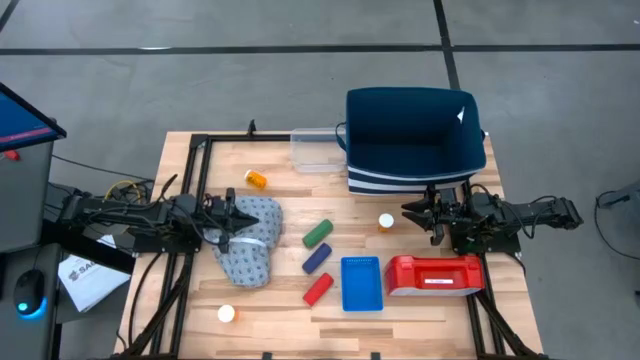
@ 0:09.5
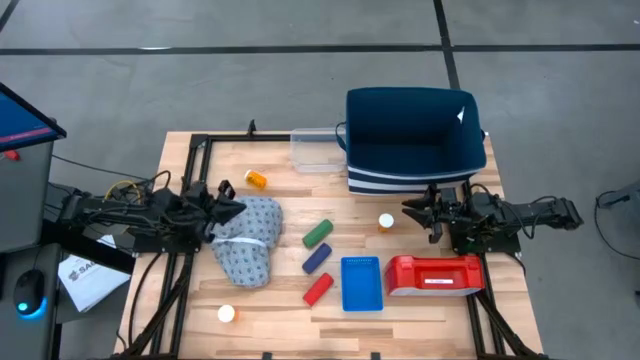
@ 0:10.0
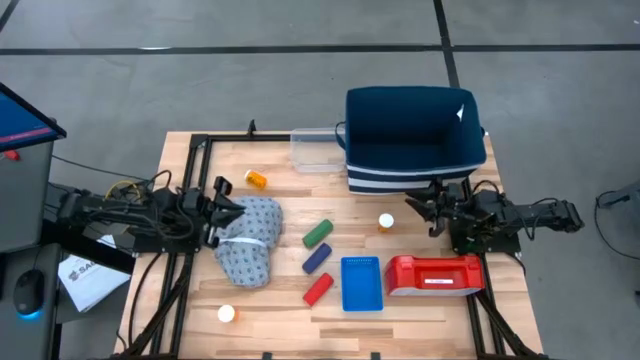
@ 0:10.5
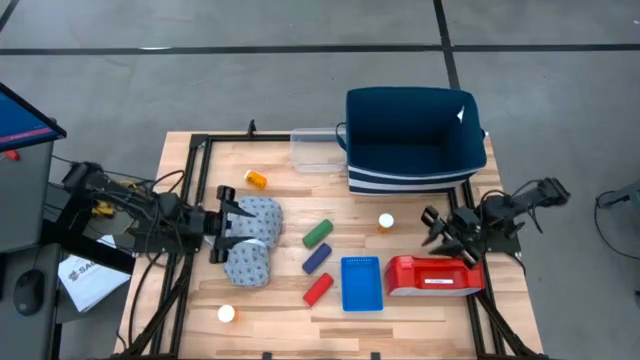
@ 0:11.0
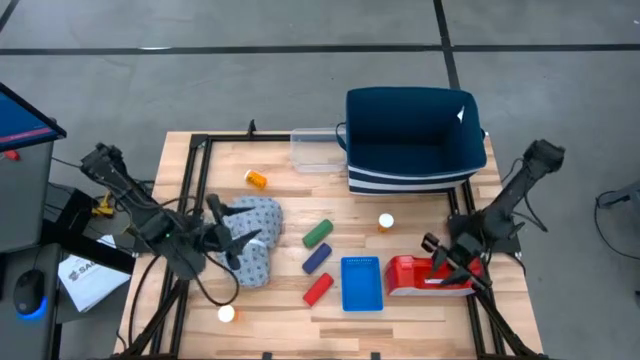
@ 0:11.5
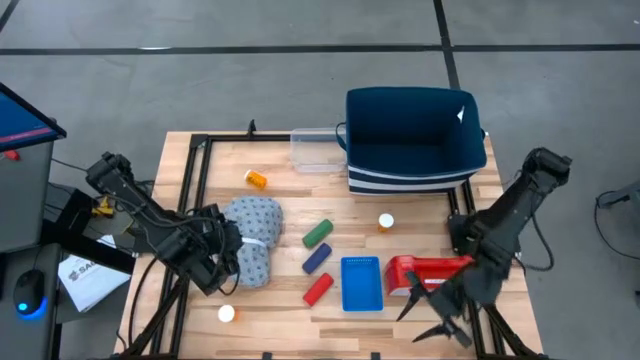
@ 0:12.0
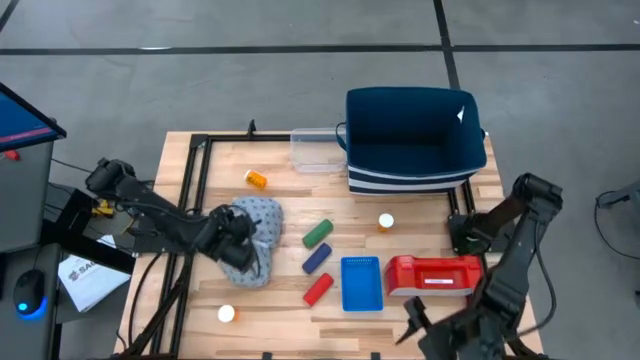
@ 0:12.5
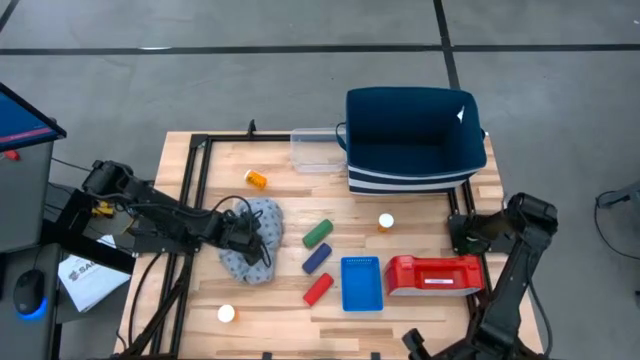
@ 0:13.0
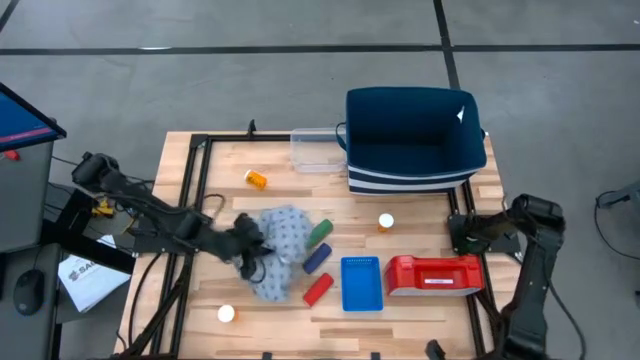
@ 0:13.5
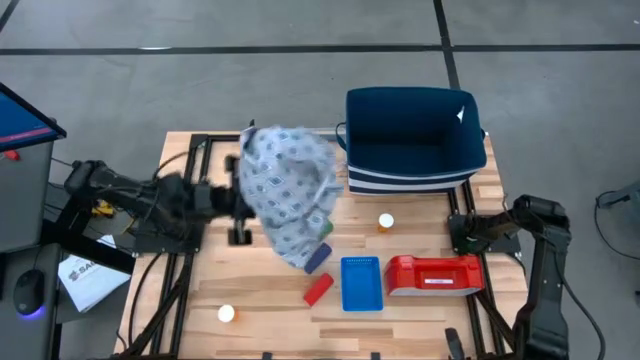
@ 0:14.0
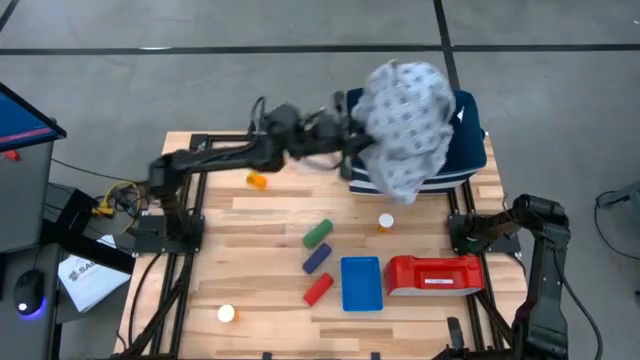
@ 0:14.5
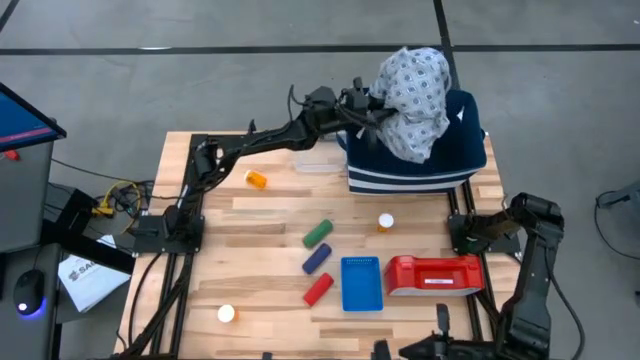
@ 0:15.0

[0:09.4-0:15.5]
Task: Pick & Place Medicine items
Put the gray patient gown into the blue laundry organizer

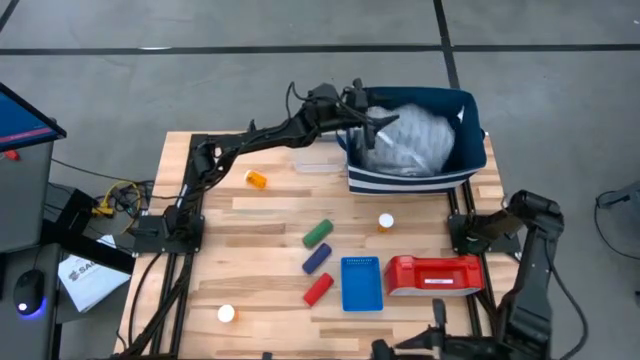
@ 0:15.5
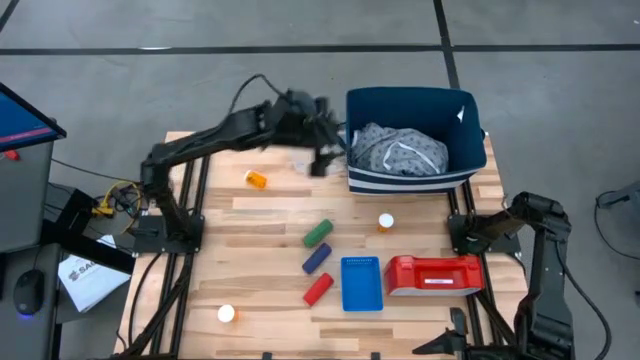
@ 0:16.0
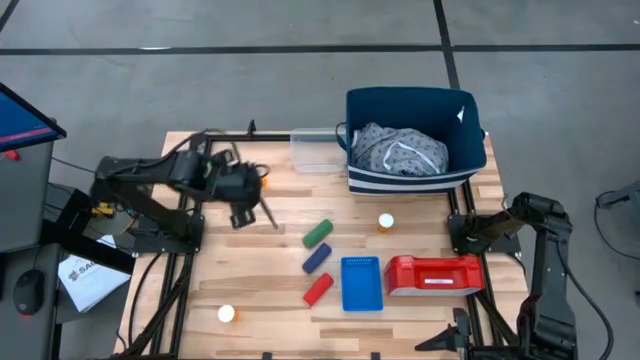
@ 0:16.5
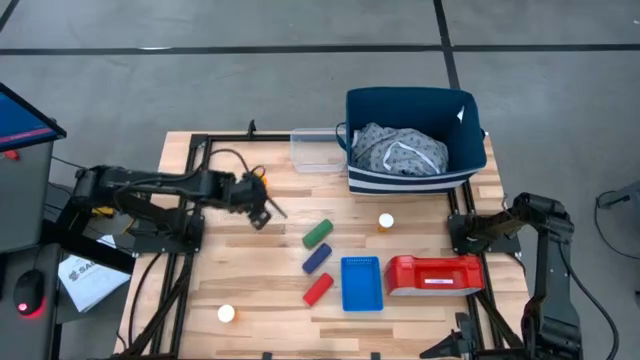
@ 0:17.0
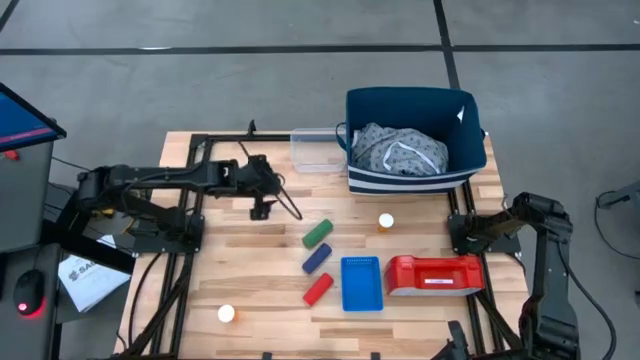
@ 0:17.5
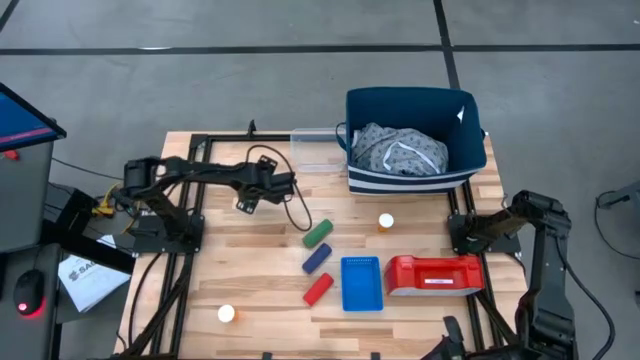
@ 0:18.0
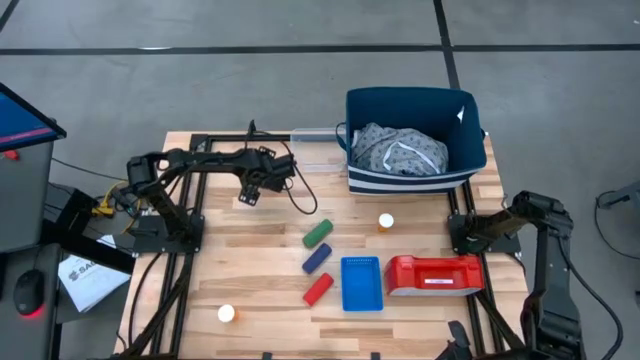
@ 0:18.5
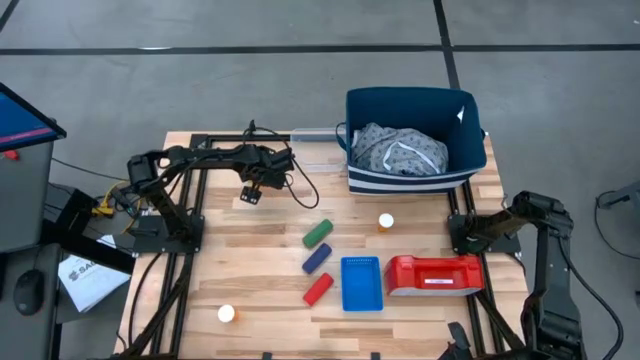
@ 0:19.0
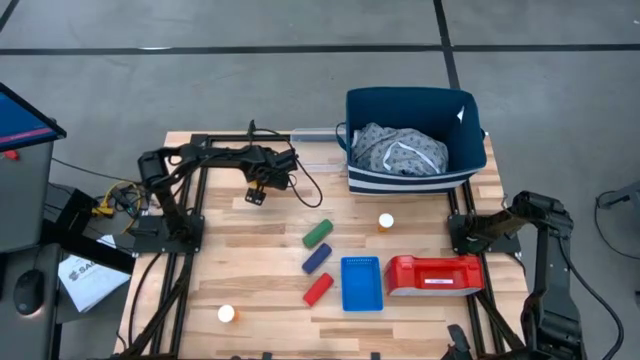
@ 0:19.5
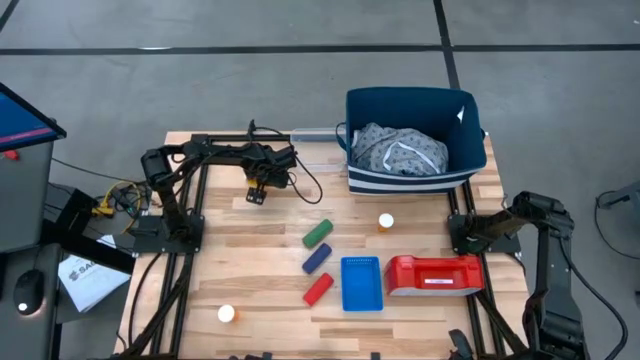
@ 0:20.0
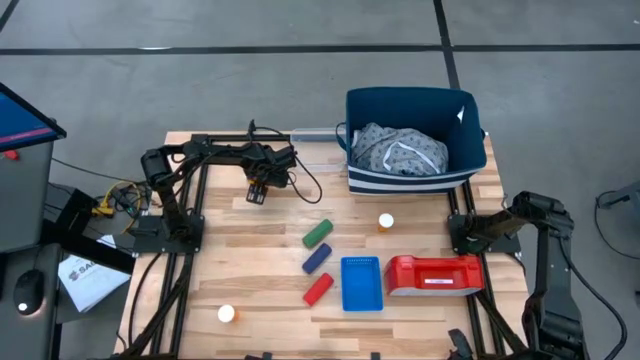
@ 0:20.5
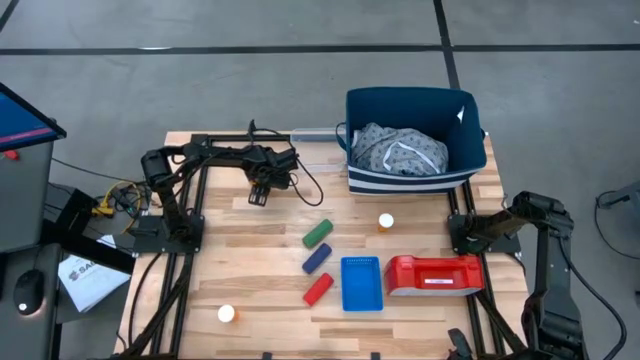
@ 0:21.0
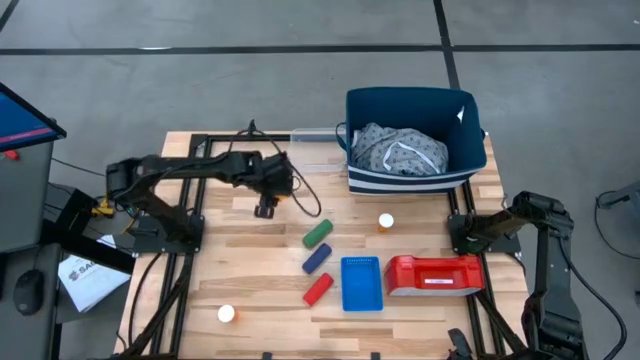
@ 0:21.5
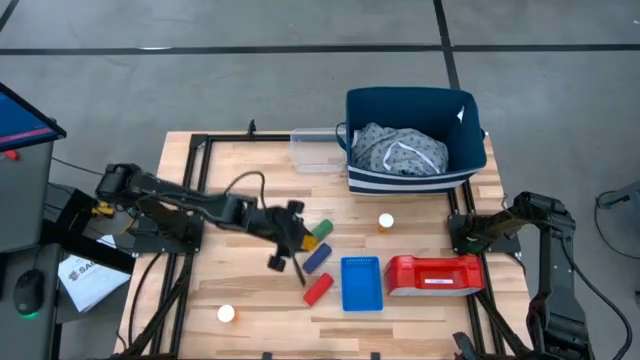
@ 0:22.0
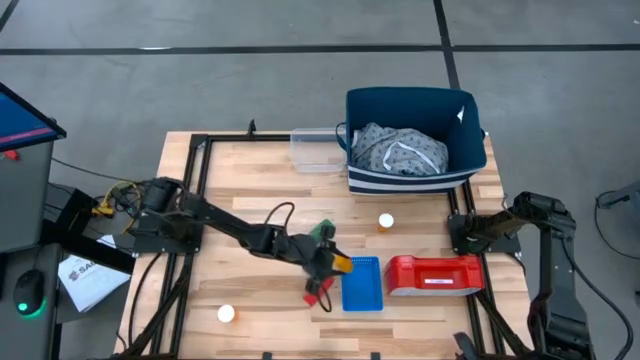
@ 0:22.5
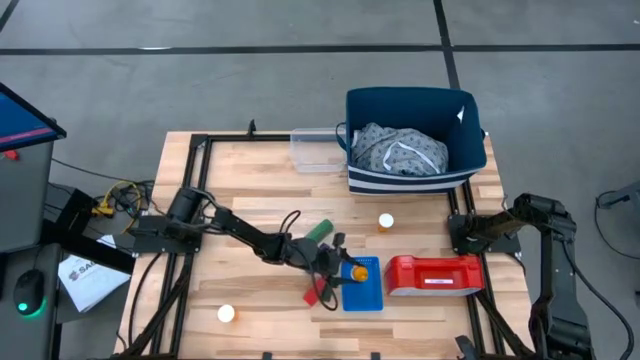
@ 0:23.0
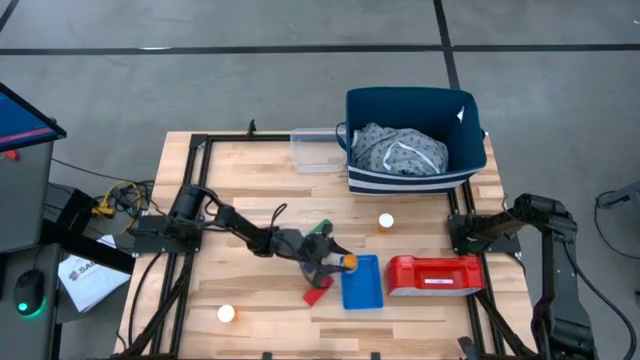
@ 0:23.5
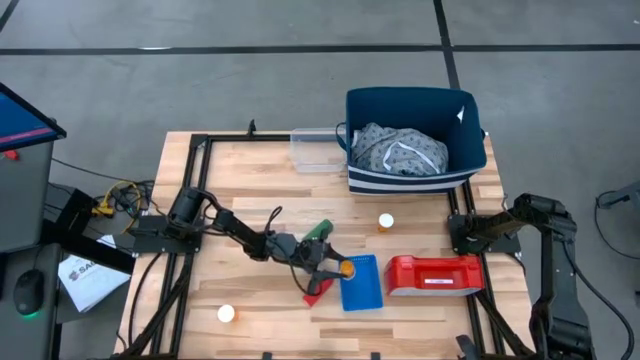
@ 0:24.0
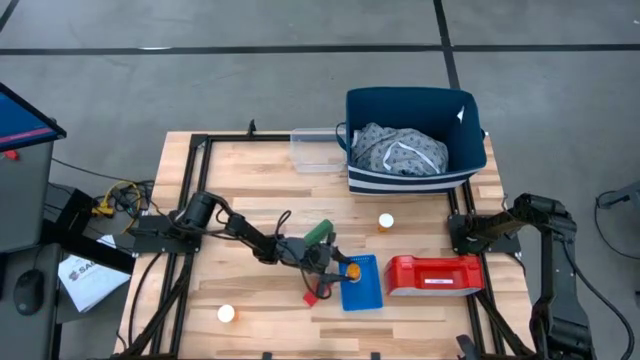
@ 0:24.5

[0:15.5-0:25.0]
Put the top orange pill bottle into the blue bin

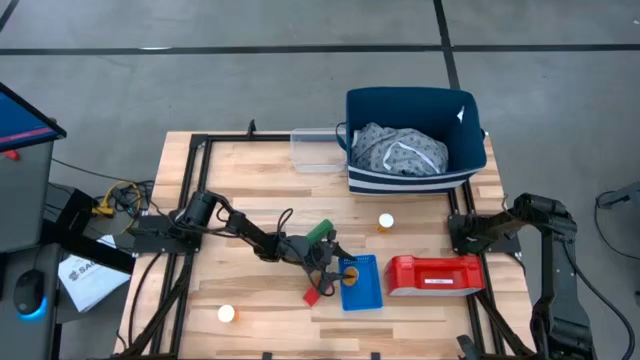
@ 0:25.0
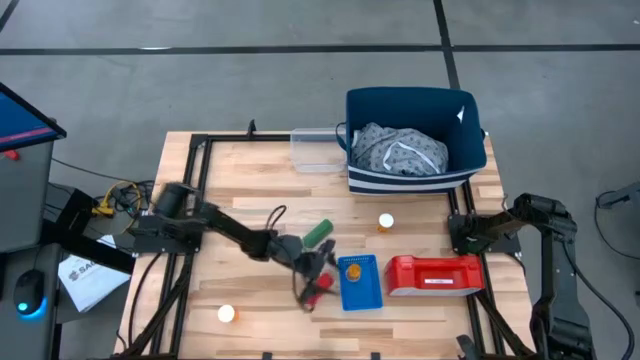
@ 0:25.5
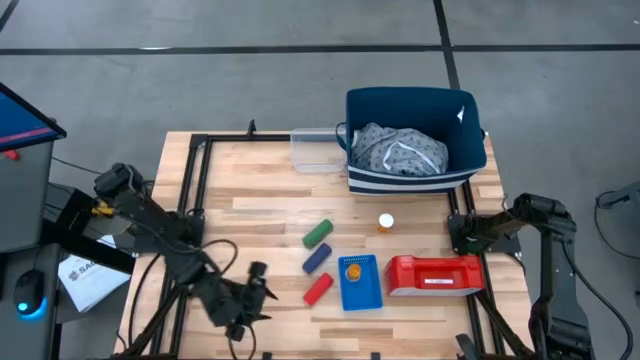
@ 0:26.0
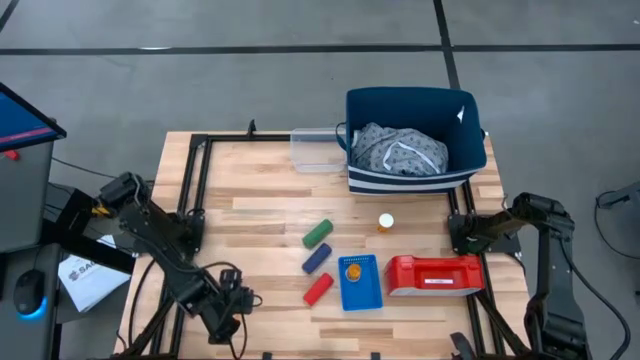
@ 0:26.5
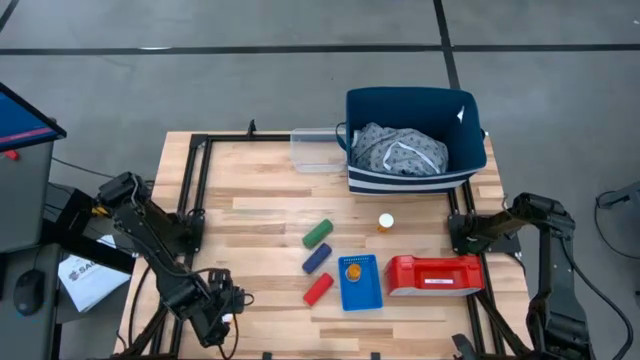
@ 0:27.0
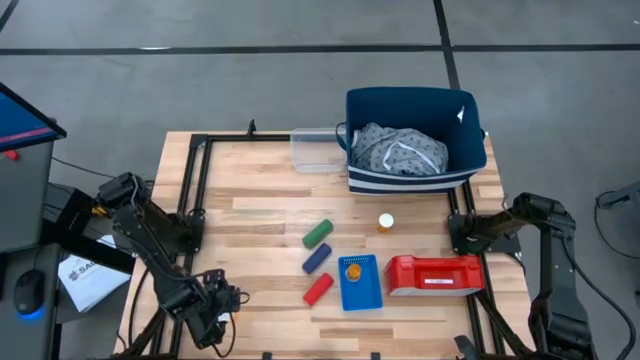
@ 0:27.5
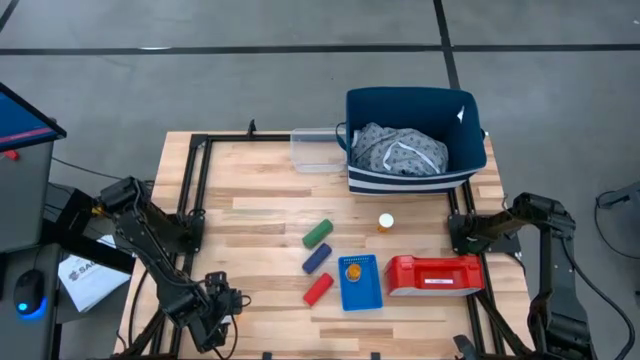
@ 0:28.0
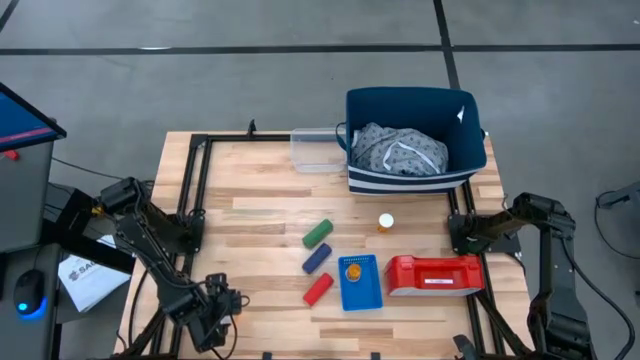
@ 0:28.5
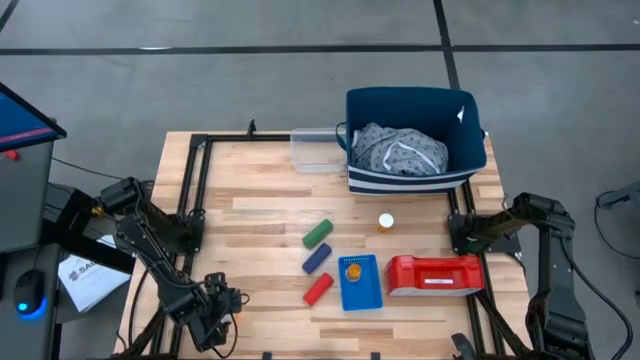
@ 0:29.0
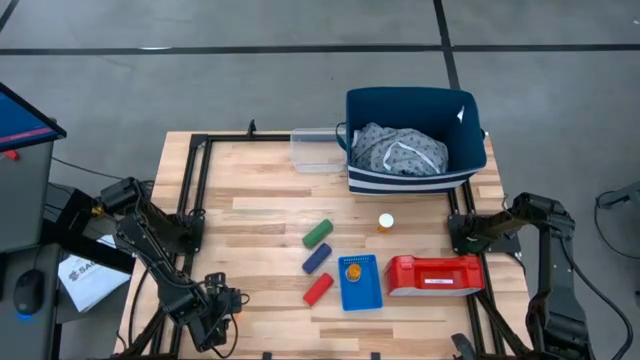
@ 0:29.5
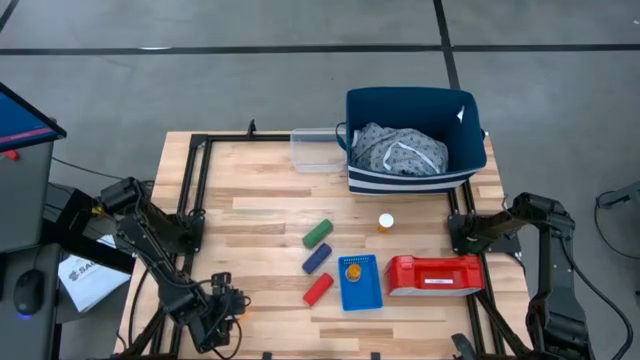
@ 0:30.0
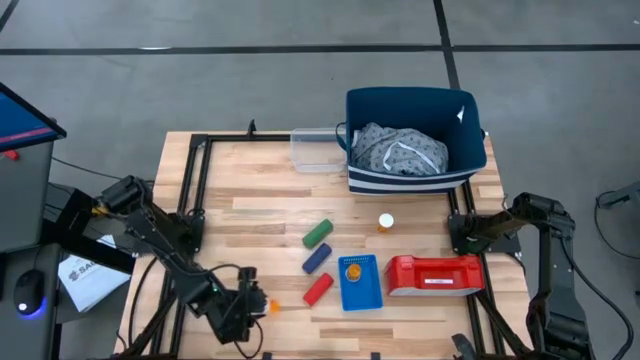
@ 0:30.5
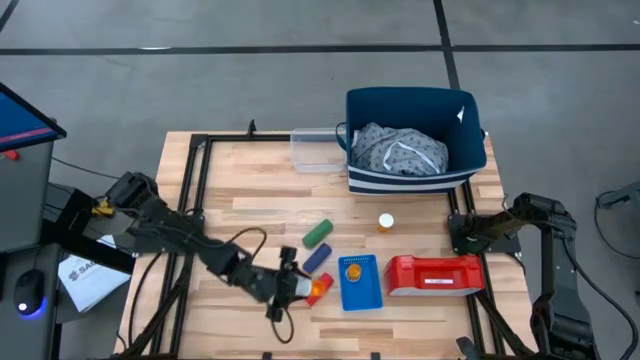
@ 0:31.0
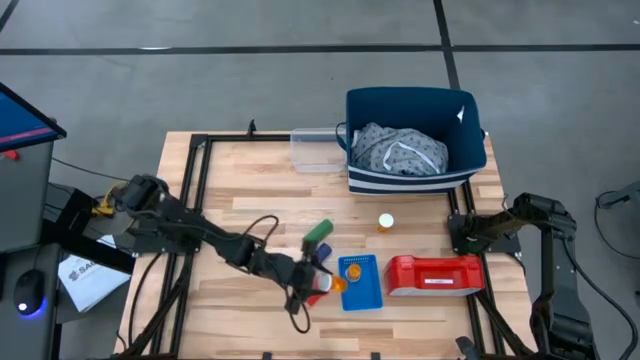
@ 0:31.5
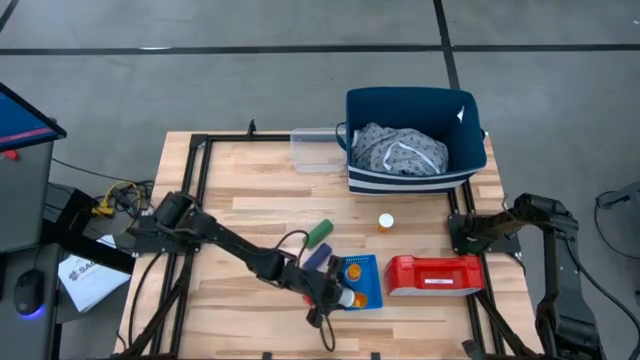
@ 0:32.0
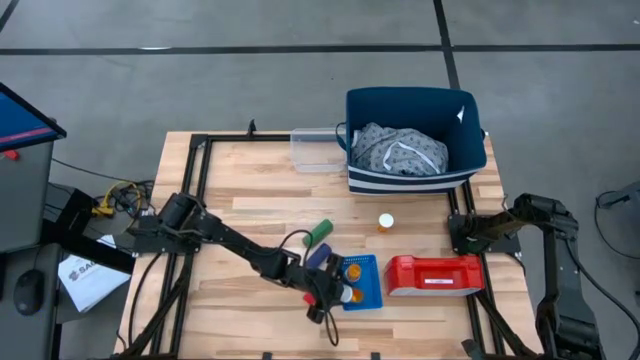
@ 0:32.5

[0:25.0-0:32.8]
Put the bottom orange pill bottle into the blue bin
